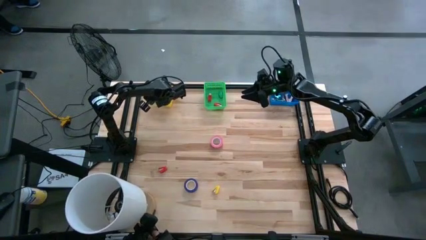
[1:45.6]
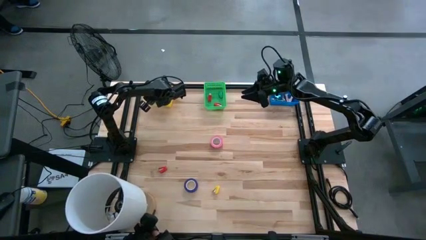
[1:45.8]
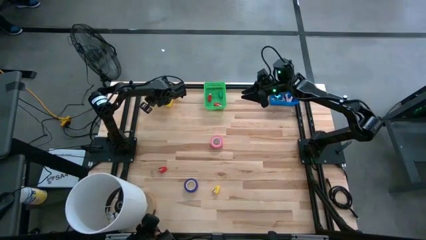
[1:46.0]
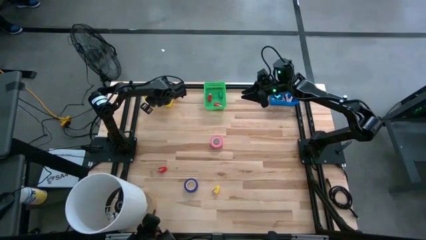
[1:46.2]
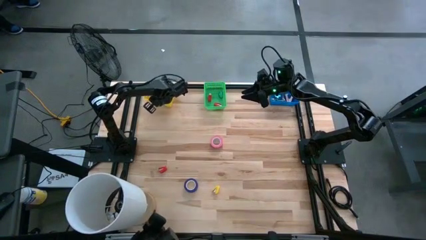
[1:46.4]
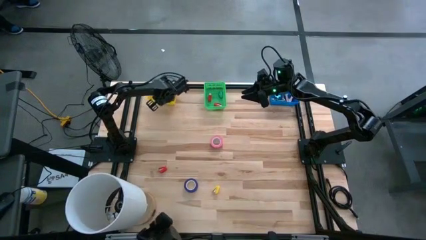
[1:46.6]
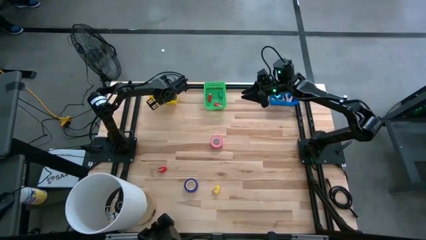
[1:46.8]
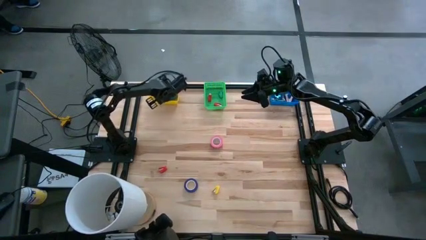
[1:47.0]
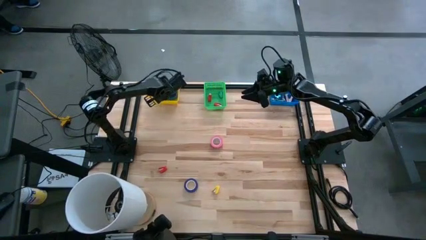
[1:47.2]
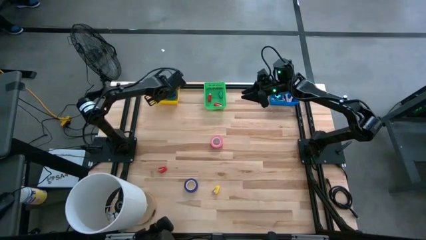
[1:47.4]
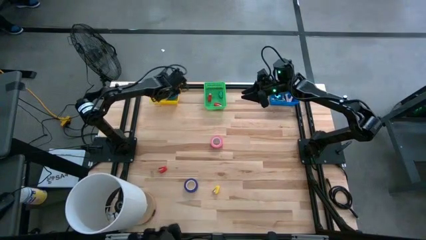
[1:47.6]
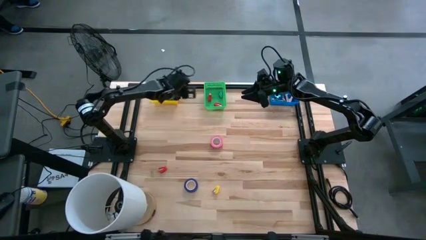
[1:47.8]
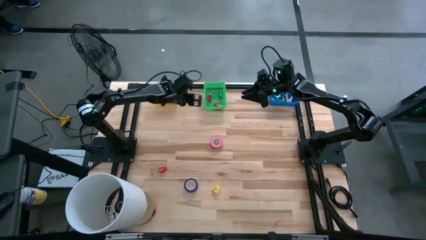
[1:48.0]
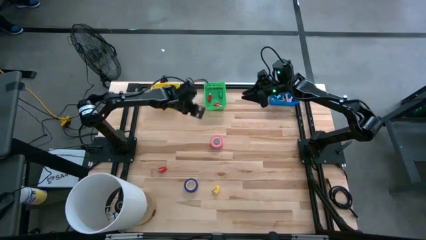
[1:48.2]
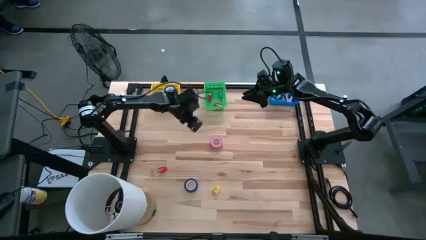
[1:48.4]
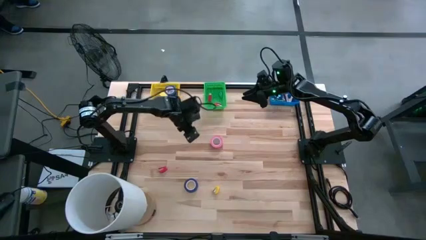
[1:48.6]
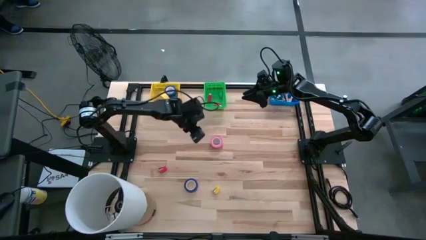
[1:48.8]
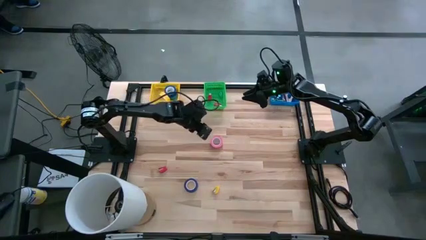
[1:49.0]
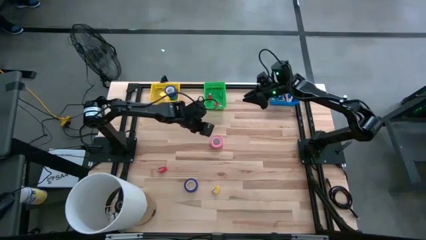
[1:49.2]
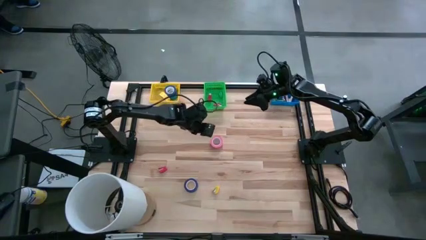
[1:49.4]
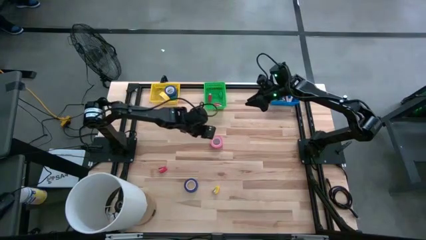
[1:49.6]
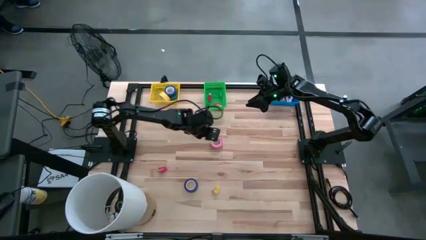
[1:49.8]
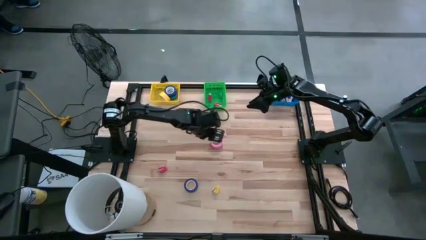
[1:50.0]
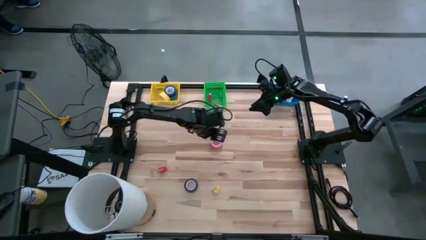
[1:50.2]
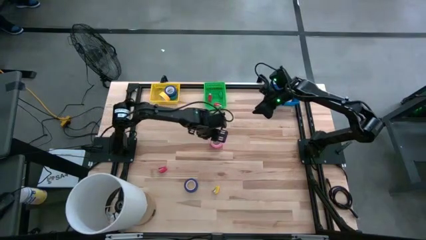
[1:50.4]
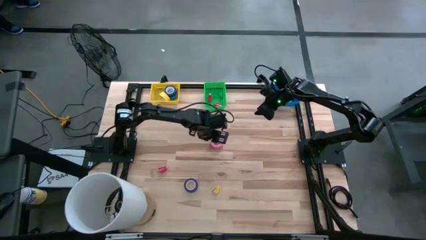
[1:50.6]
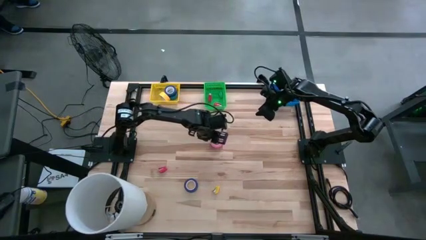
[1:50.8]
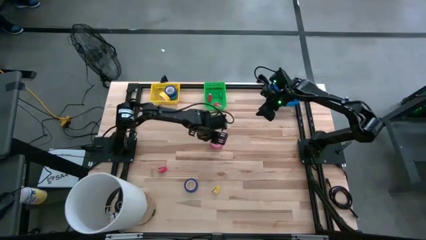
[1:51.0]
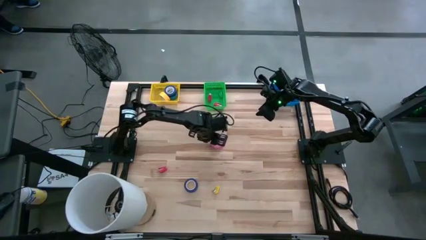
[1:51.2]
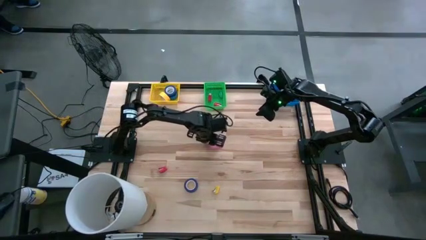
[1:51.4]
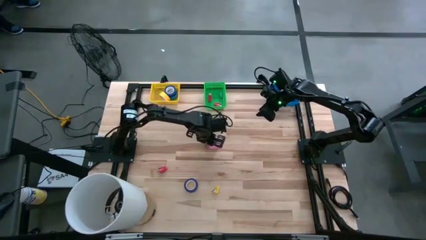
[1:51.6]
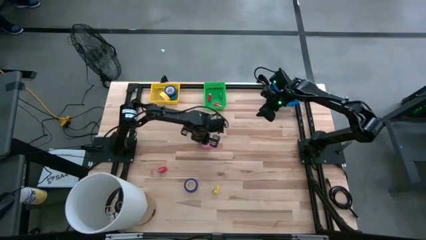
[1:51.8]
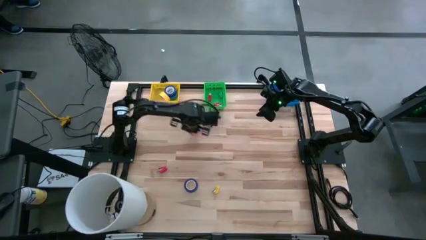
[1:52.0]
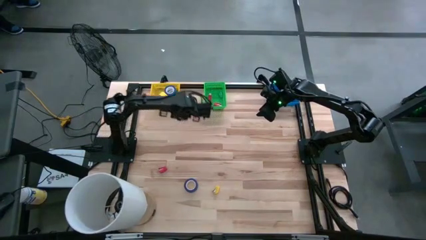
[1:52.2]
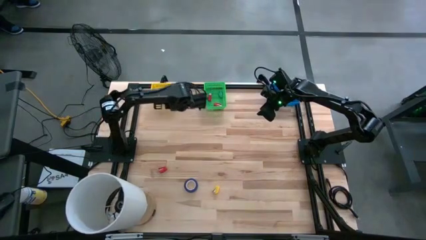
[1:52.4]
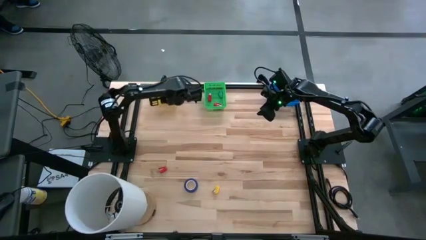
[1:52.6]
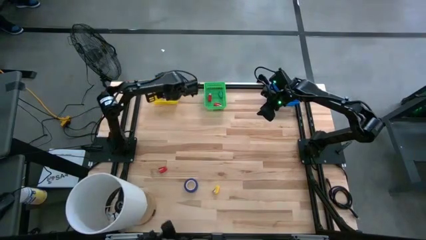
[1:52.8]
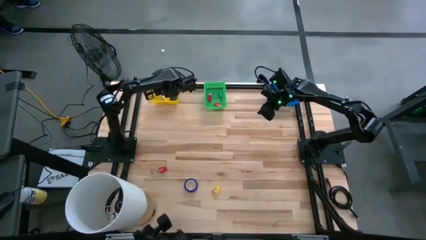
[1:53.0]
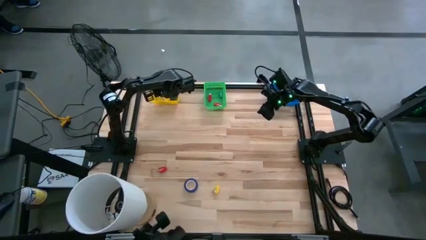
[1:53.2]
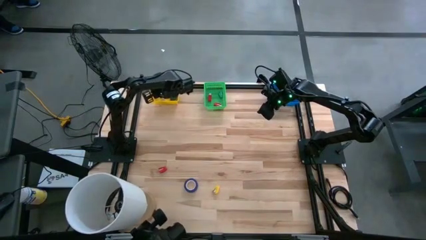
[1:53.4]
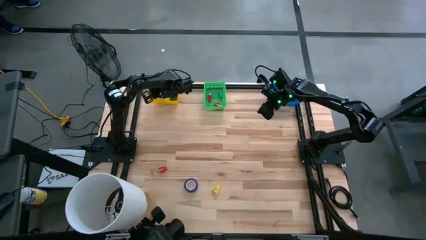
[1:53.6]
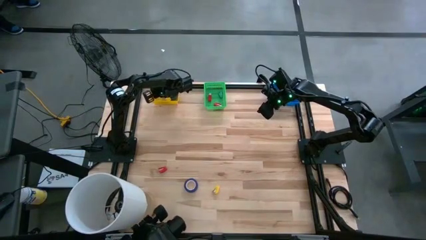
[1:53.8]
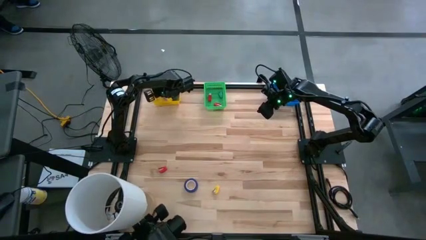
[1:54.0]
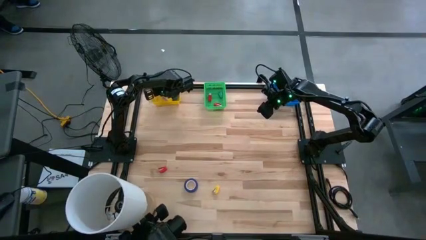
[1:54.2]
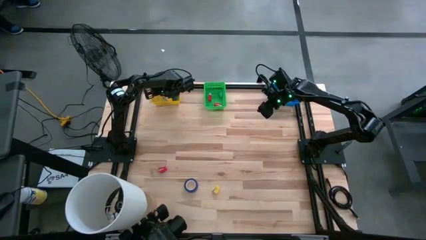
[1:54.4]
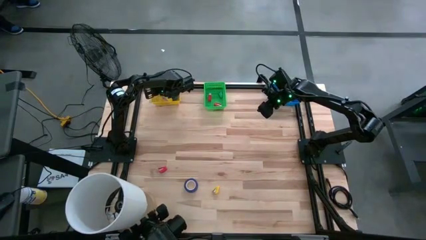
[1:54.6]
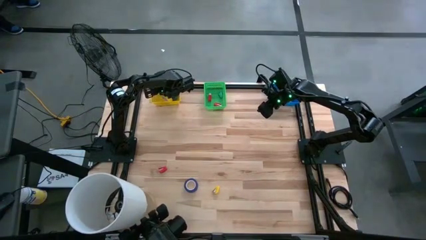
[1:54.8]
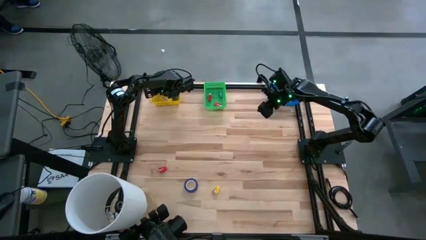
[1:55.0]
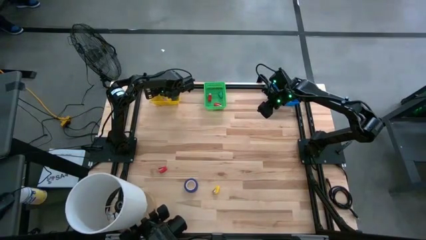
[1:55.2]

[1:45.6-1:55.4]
Task: Pick and place Stapler, Stapler remover, tape
Put the pink tape into the yellow basket

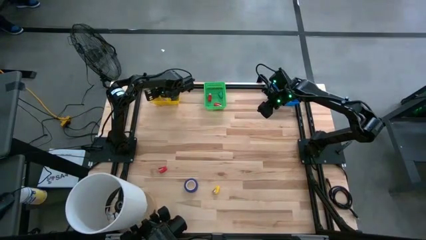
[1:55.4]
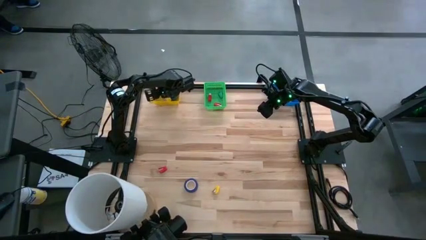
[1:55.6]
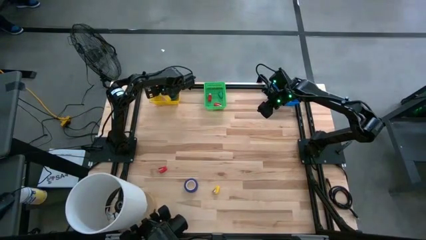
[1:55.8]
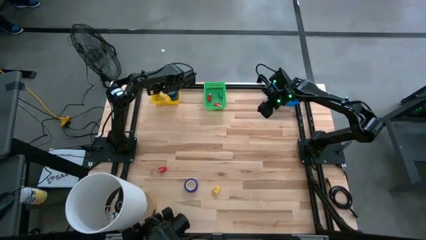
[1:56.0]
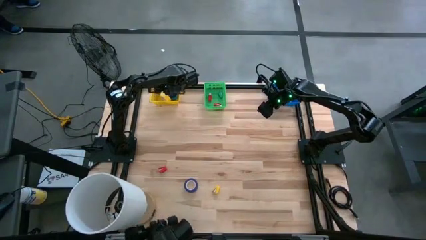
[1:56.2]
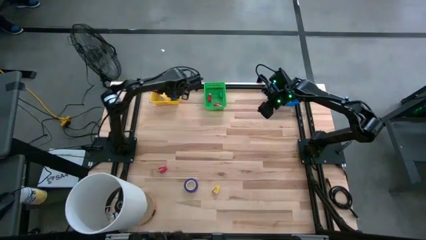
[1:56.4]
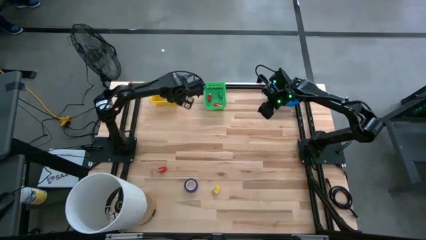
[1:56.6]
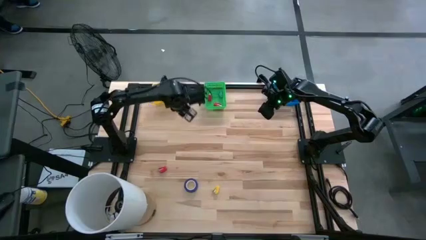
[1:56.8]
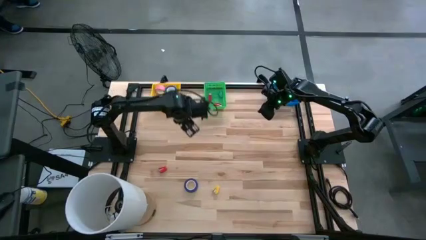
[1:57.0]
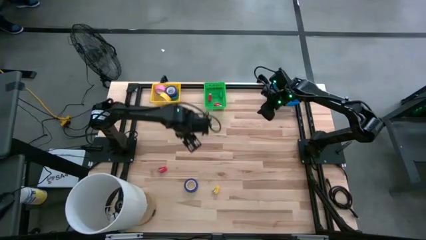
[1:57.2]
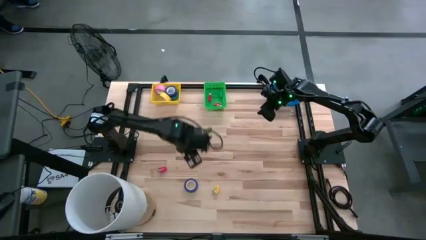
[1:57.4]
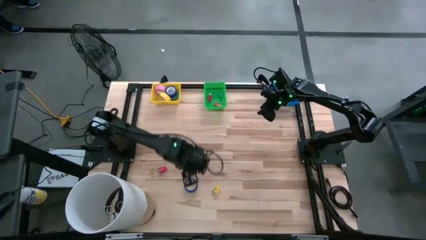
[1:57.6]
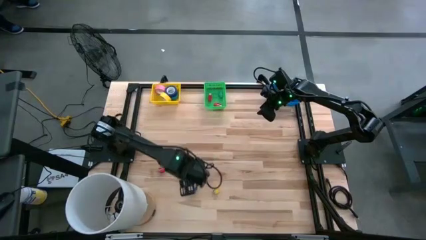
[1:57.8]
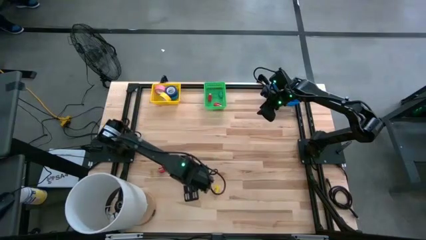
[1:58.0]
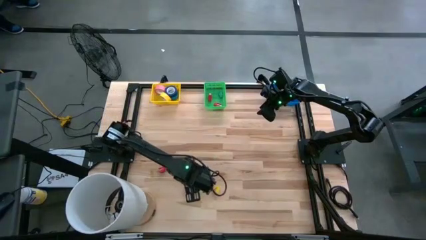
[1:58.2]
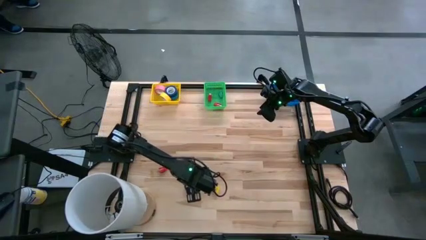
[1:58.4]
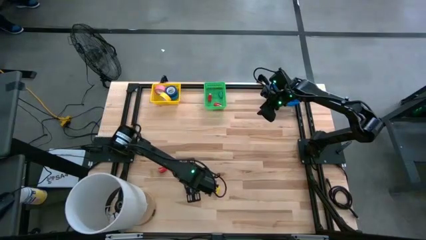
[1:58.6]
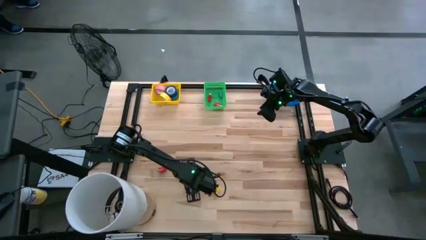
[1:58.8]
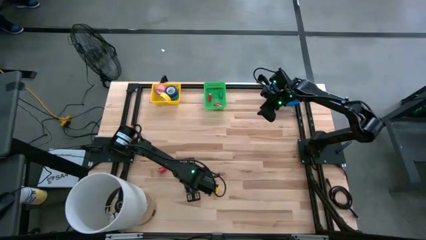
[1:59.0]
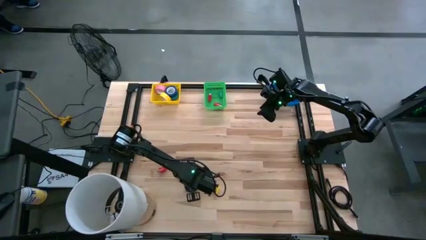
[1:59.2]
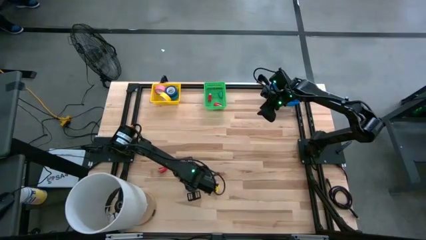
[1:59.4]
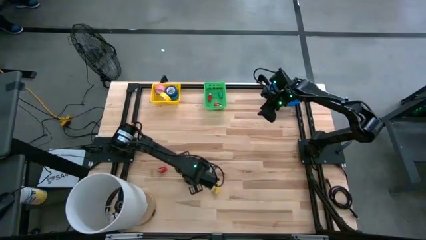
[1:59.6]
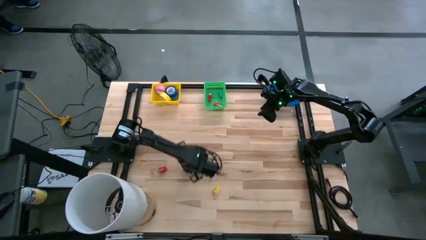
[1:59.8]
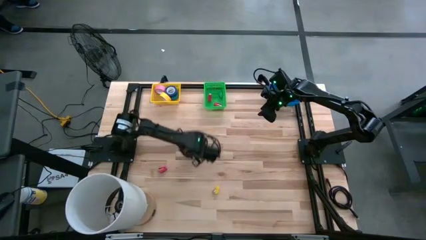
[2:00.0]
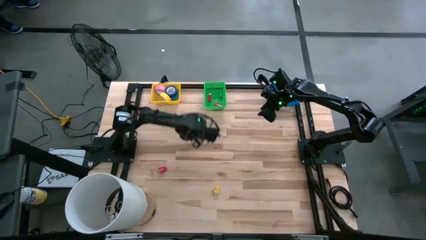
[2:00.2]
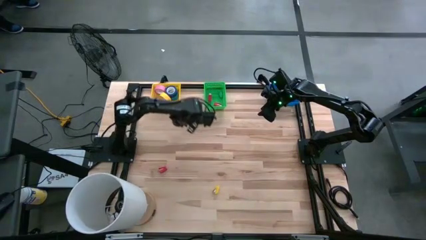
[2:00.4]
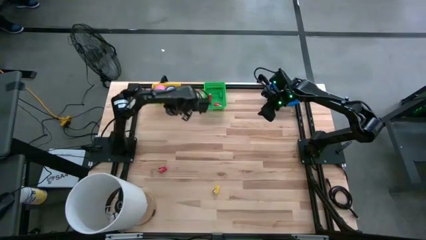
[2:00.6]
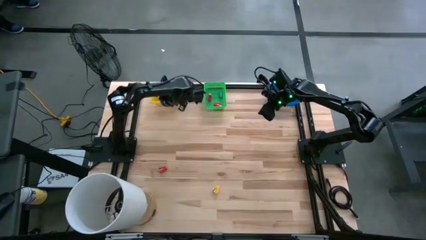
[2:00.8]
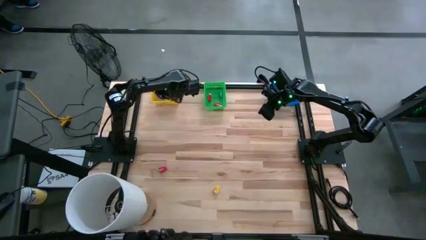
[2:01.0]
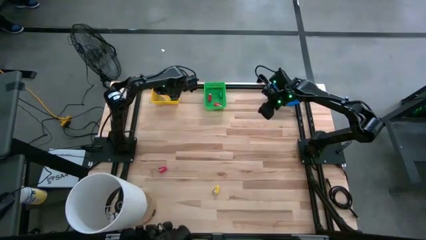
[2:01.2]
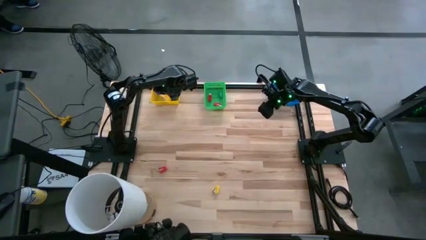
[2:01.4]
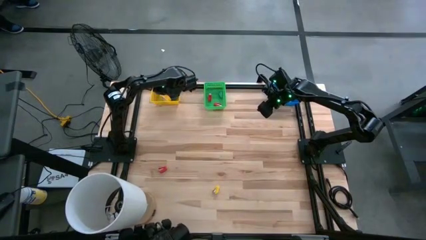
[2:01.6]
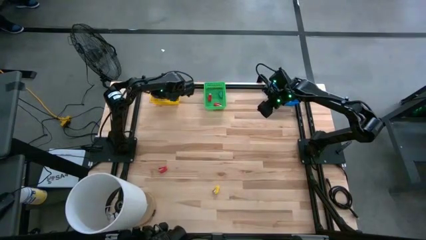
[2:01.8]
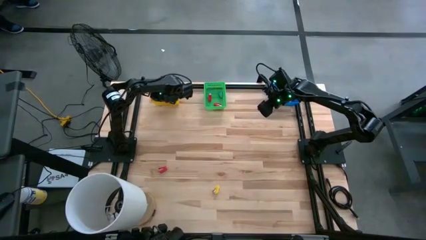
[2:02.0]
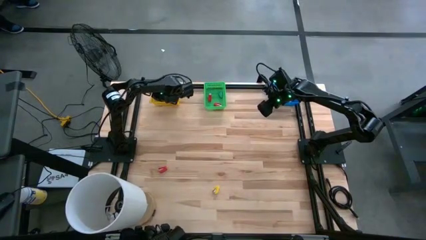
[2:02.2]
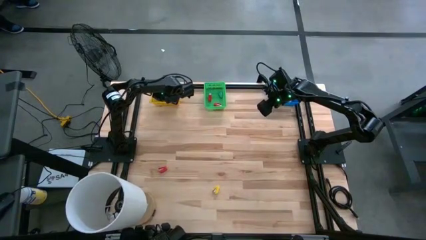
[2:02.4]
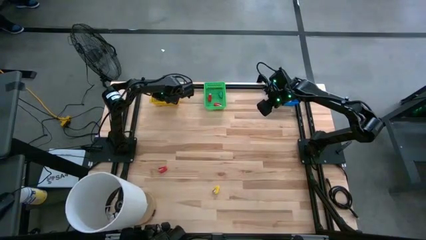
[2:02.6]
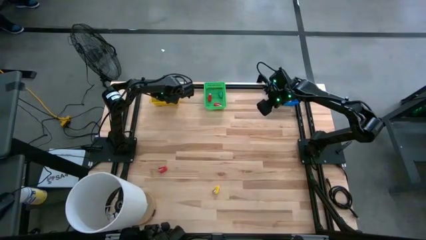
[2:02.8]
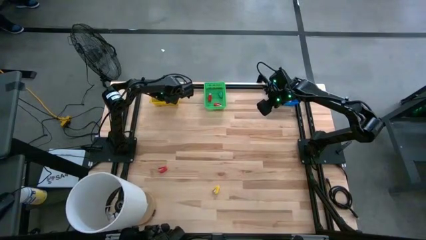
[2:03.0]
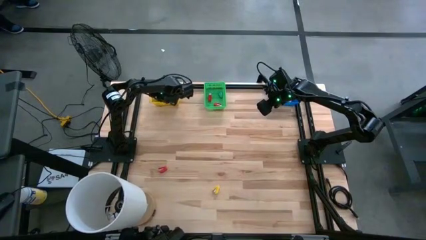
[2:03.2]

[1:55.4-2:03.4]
Put the blue tape into the yellow basket
